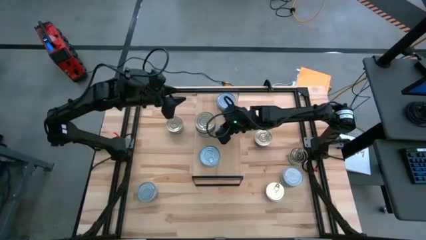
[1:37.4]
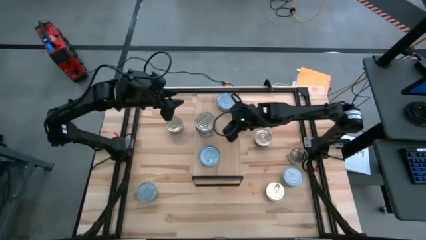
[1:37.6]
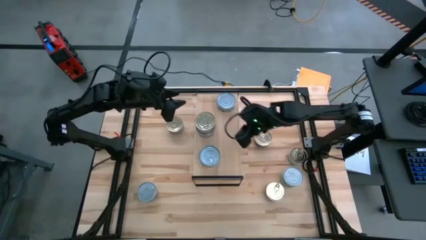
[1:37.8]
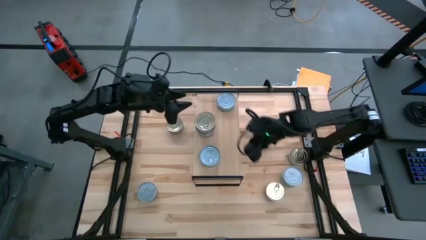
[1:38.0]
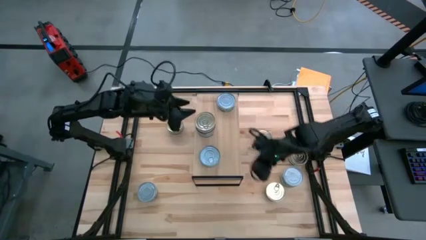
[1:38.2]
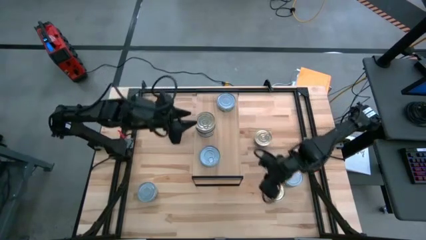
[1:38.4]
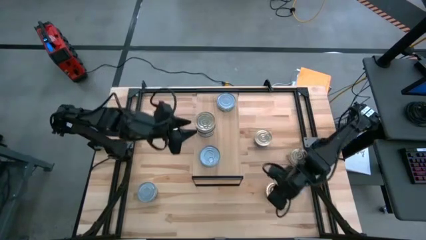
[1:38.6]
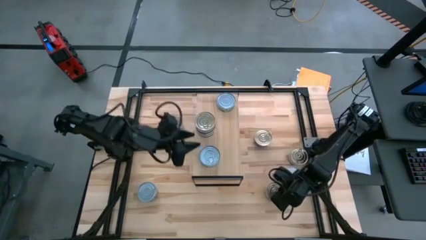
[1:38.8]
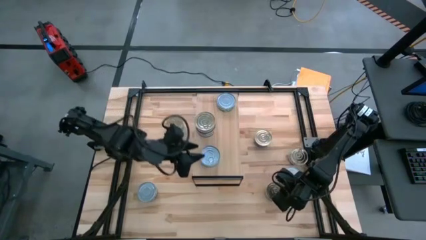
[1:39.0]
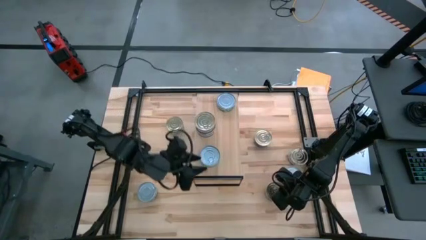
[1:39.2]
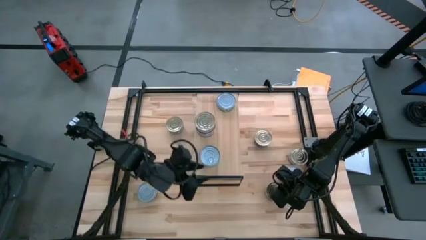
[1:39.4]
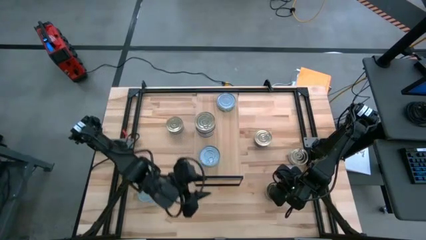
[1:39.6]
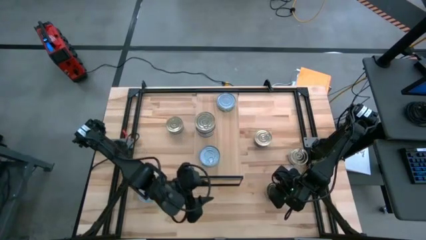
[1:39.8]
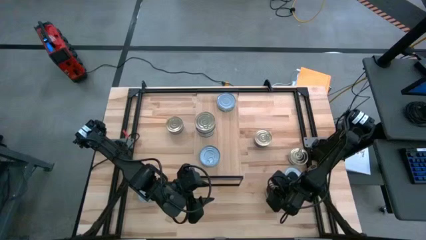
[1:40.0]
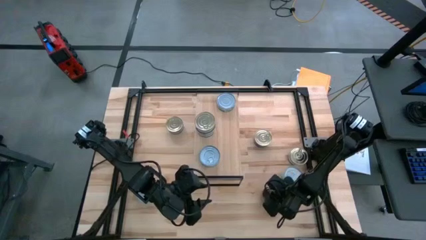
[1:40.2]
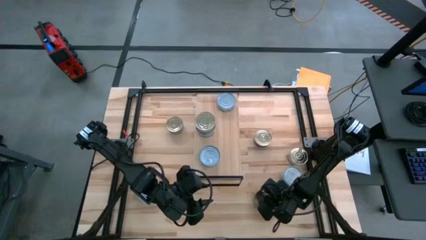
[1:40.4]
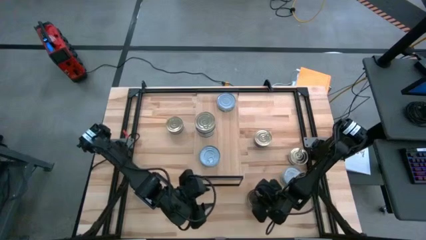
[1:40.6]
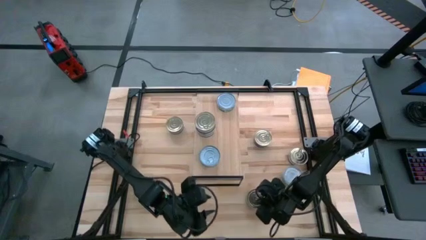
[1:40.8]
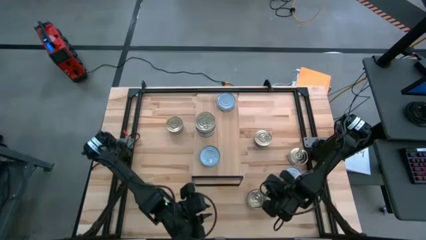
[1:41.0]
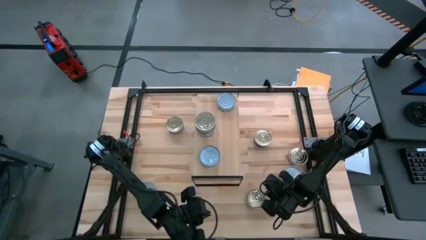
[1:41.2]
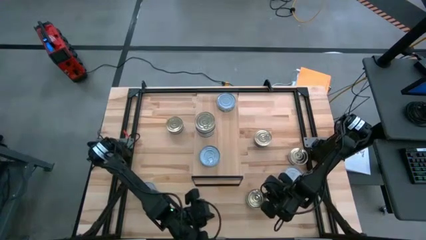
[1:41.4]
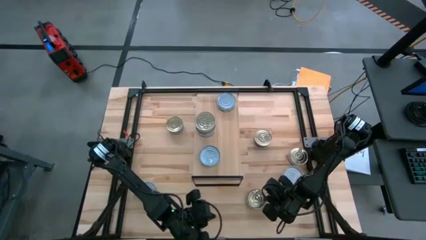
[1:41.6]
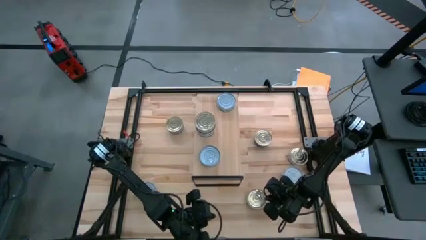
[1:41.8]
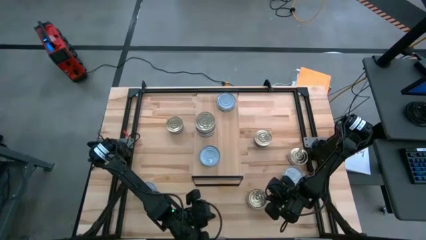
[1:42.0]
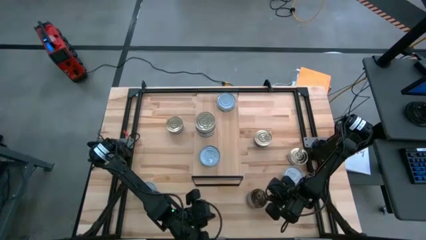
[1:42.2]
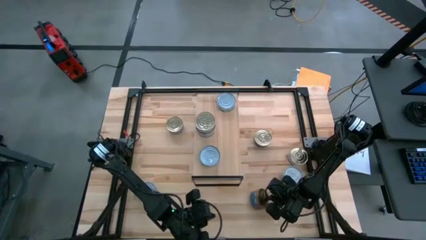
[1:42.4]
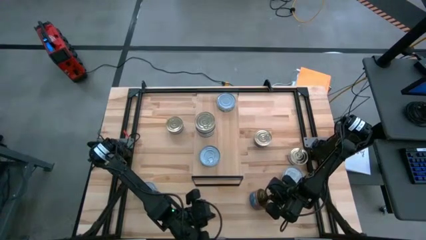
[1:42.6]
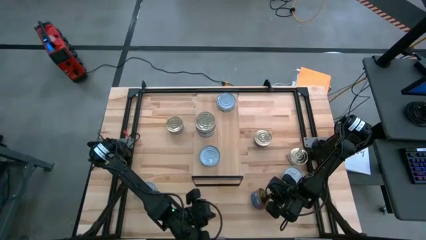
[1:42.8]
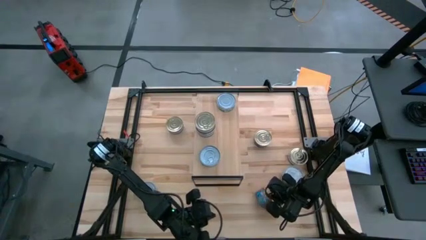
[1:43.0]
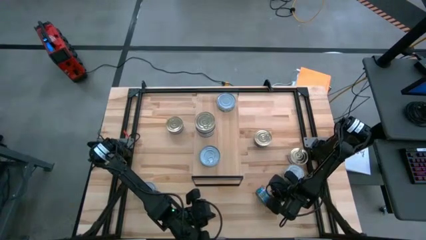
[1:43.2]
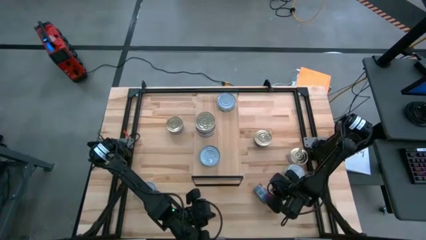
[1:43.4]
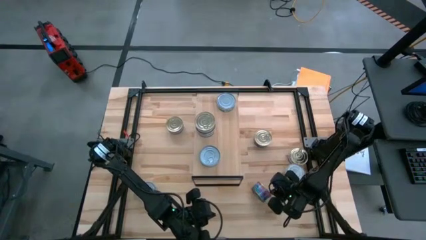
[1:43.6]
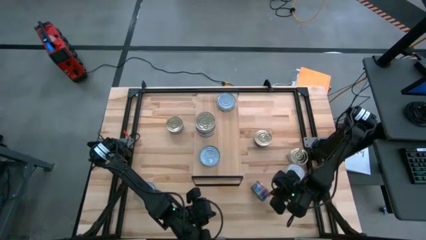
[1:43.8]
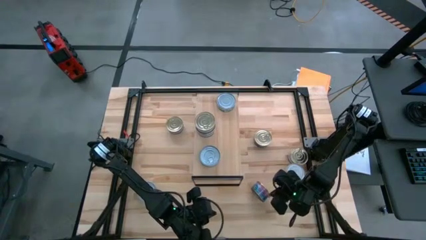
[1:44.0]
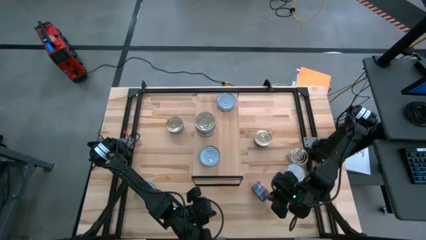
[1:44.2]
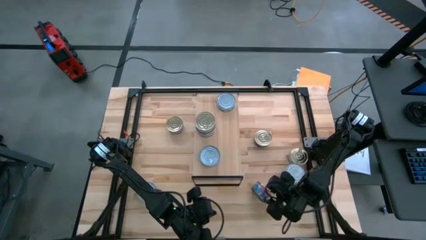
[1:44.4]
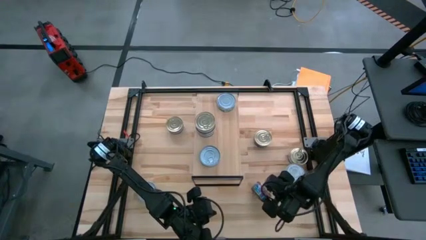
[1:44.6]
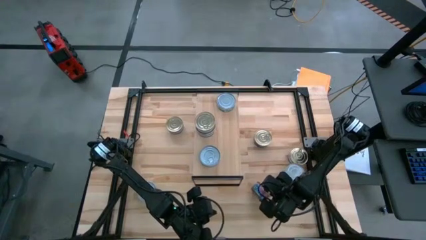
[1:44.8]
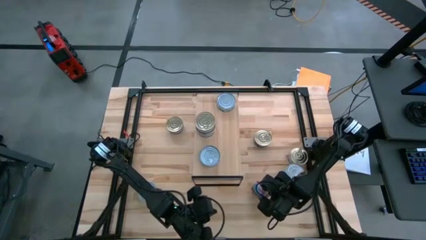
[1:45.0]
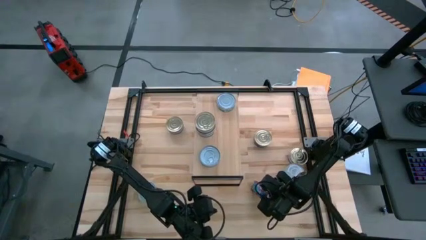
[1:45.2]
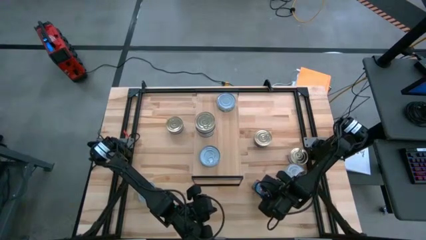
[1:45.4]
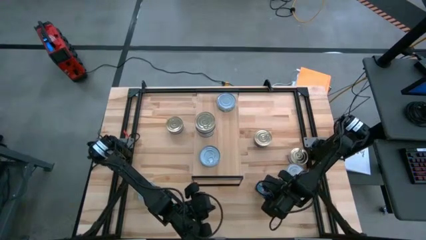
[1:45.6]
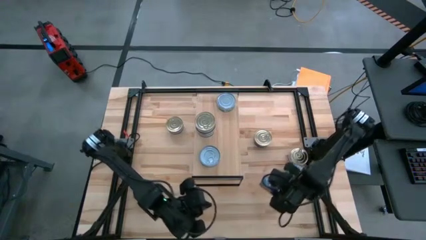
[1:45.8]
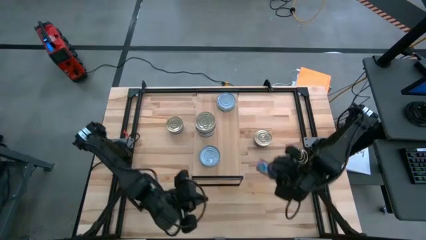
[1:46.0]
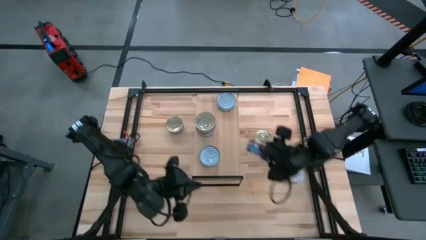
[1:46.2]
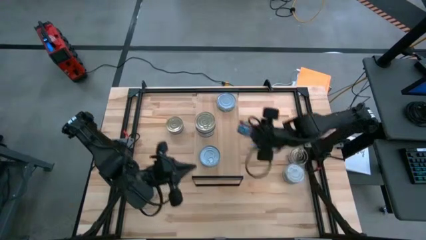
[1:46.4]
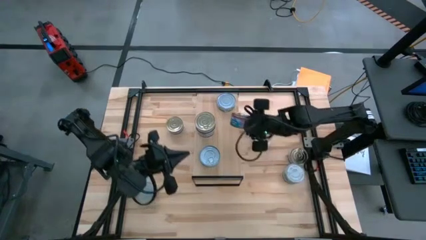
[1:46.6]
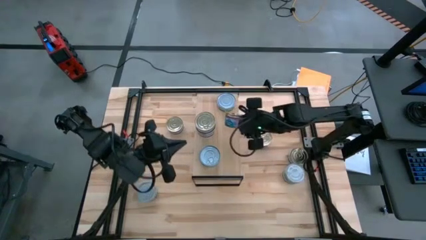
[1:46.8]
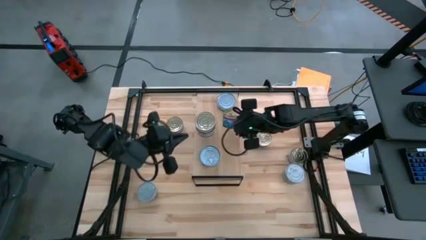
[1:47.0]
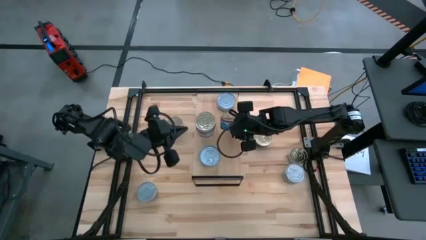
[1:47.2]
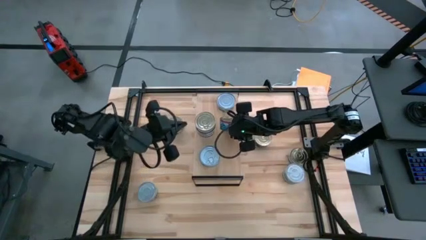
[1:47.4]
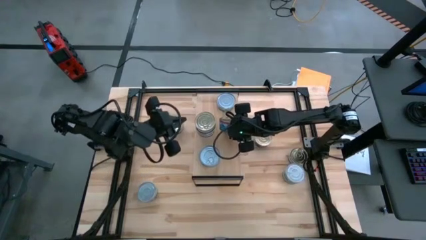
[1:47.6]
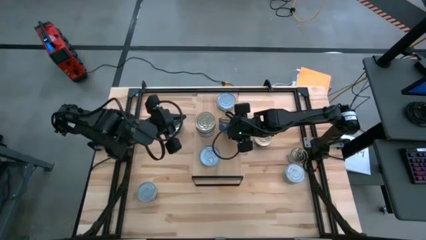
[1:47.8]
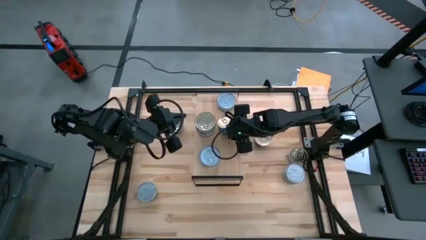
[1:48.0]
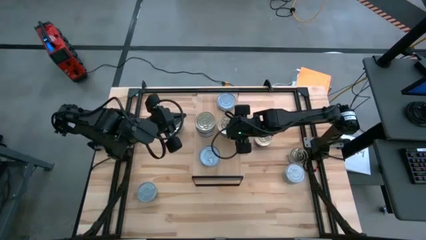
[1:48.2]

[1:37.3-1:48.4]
Task: Stack canned seafood by type on shelf
Put the blue-pink tuna can on the shelf aligned with the other blue-pink tuna can

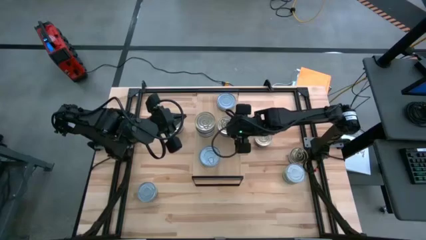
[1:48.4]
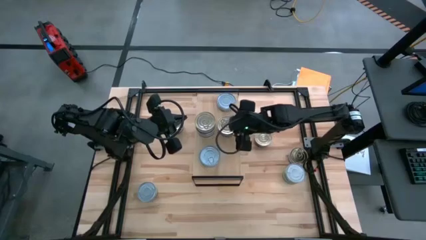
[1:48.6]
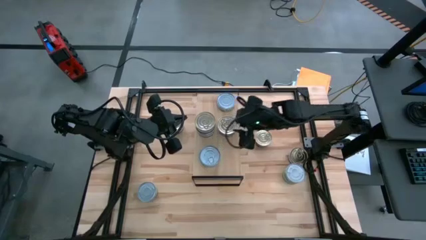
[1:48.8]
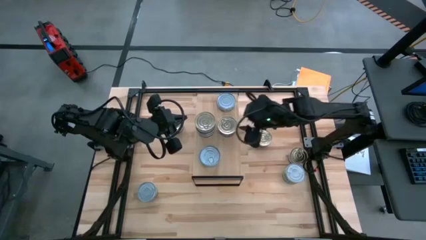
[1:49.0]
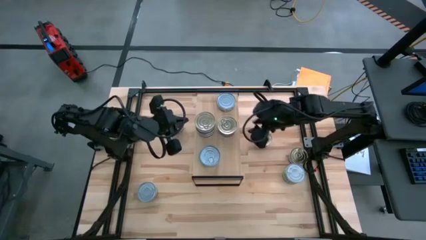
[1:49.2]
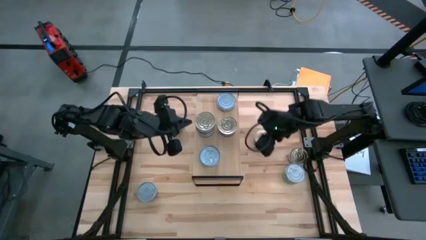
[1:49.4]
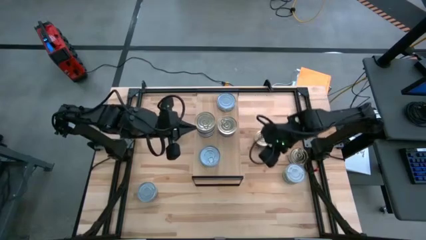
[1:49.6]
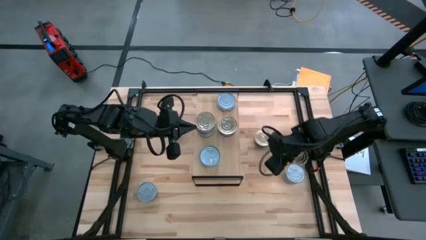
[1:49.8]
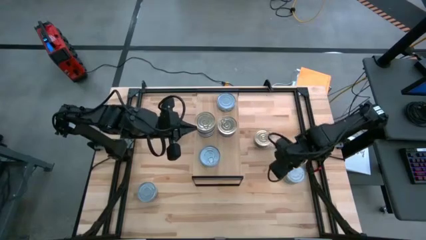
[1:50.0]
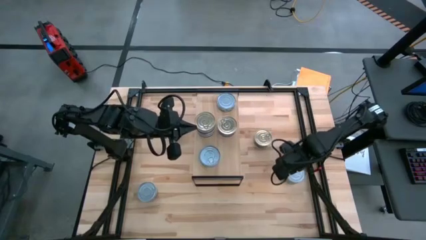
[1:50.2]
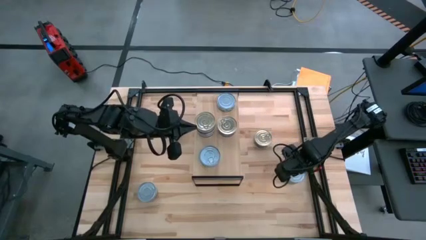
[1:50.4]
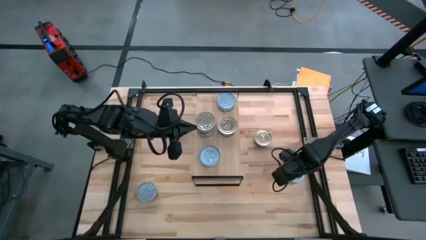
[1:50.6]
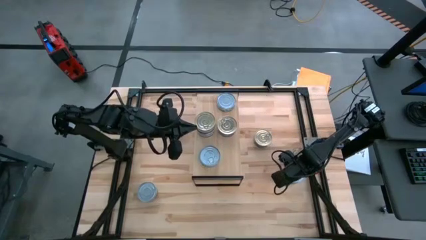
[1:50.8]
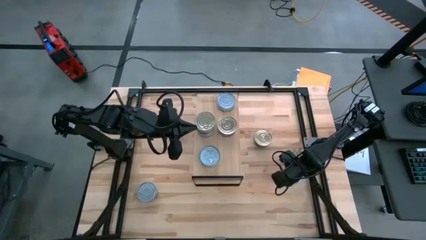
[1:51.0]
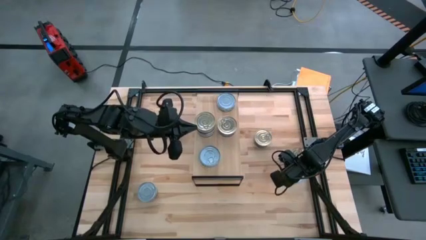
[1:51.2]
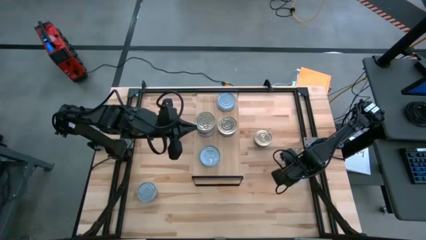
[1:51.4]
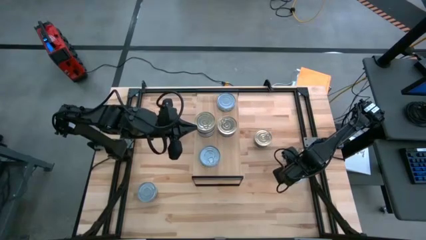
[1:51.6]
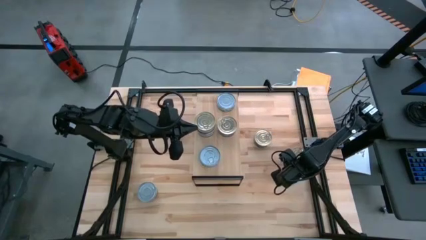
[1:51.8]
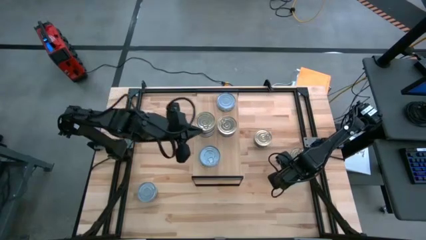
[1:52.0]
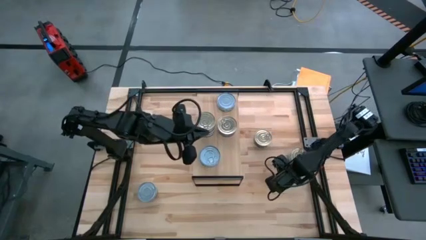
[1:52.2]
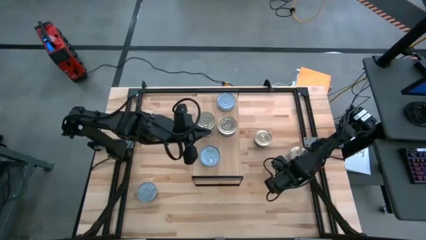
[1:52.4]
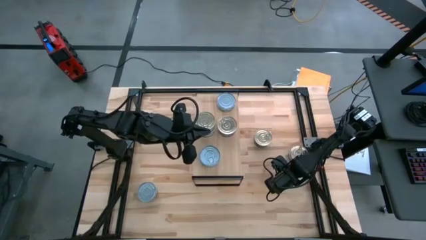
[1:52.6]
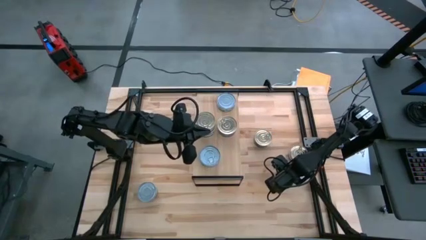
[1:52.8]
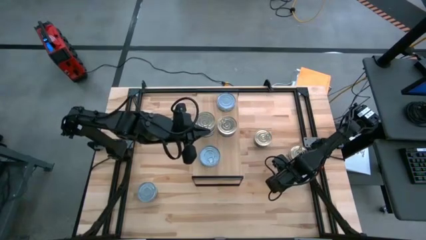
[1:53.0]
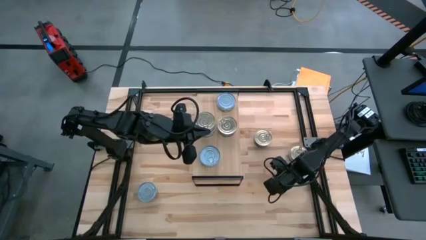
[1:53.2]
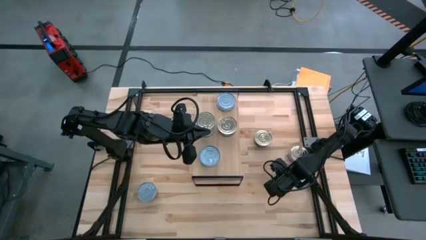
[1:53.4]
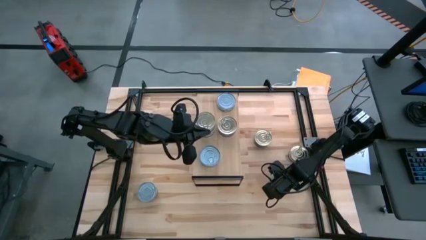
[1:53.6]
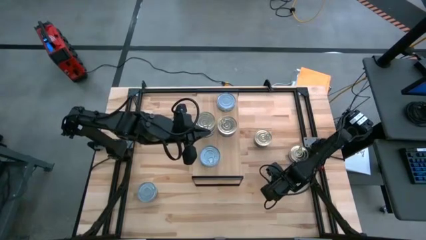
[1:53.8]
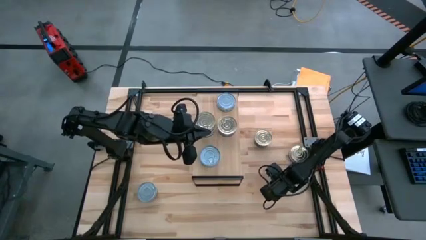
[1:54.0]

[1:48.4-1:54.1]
Stack the green tuna can on top of the green tuna can on the shelf
